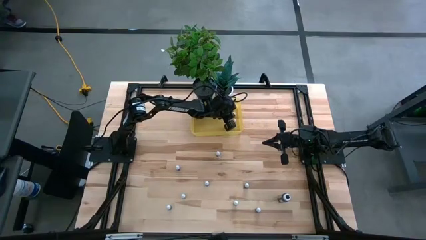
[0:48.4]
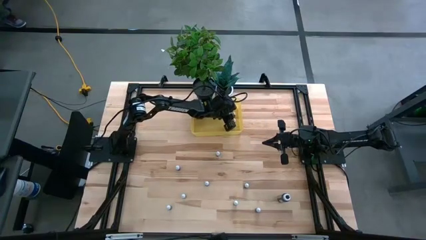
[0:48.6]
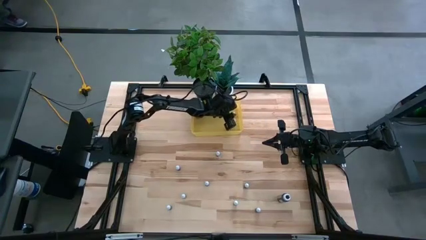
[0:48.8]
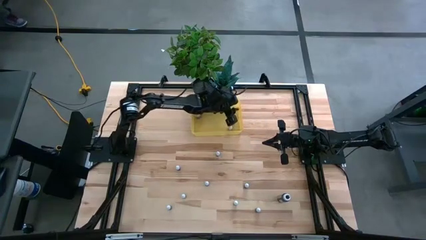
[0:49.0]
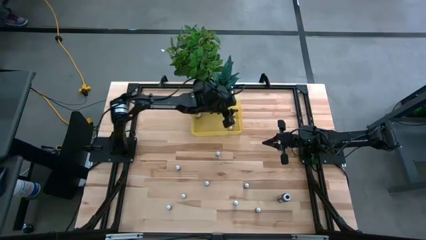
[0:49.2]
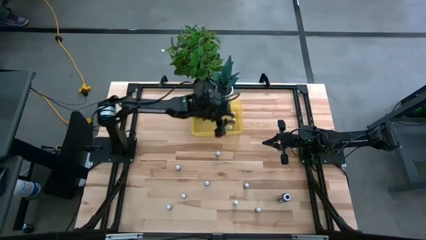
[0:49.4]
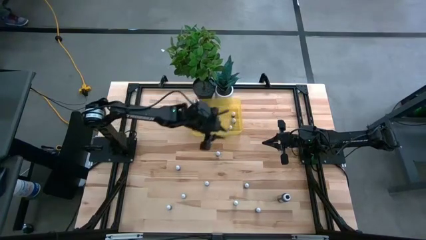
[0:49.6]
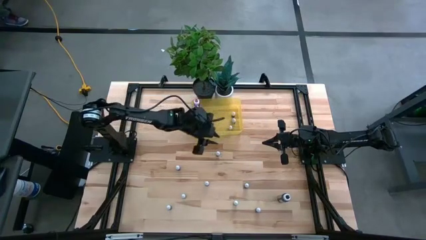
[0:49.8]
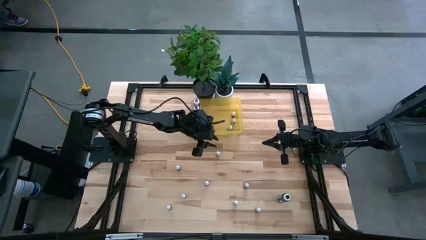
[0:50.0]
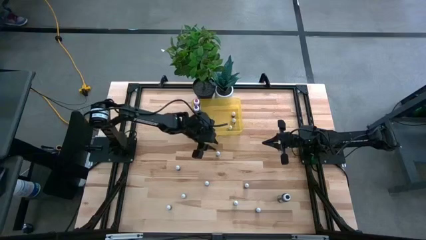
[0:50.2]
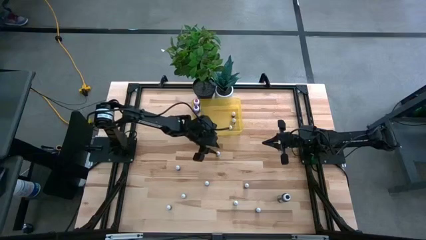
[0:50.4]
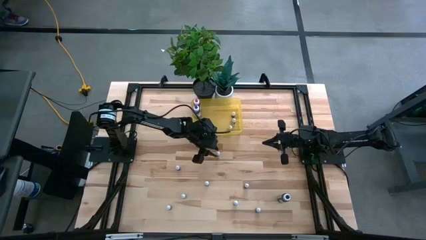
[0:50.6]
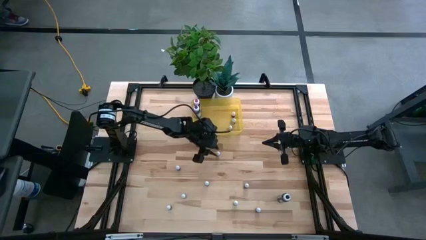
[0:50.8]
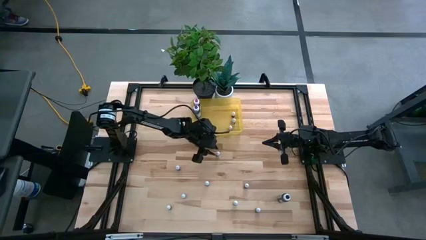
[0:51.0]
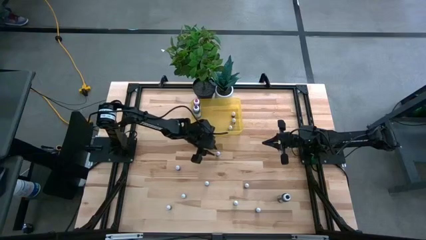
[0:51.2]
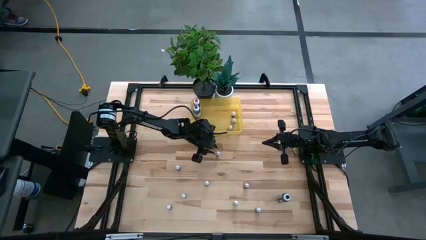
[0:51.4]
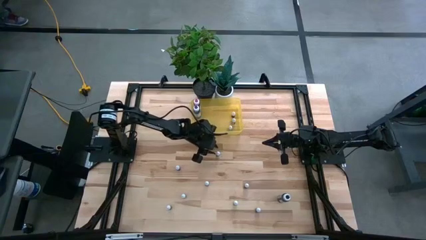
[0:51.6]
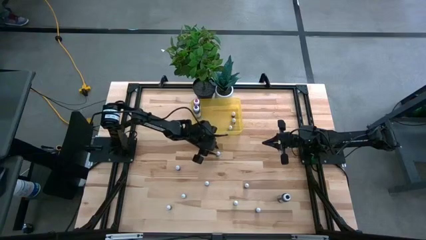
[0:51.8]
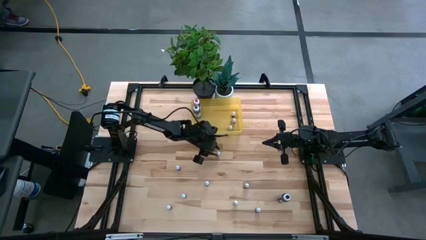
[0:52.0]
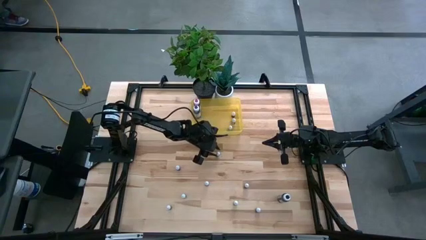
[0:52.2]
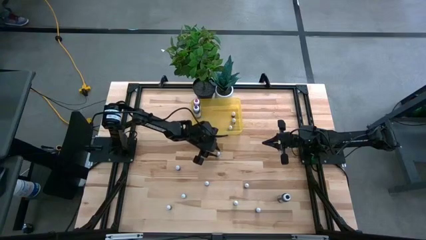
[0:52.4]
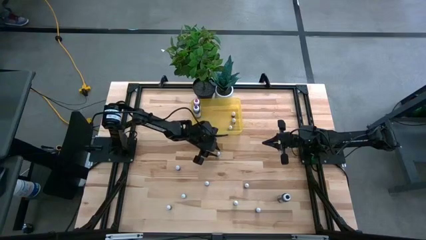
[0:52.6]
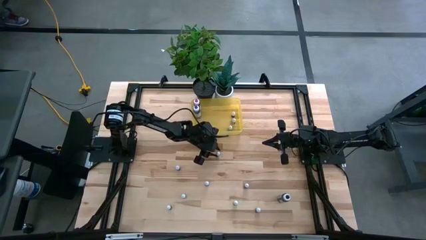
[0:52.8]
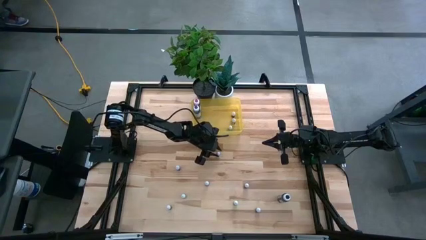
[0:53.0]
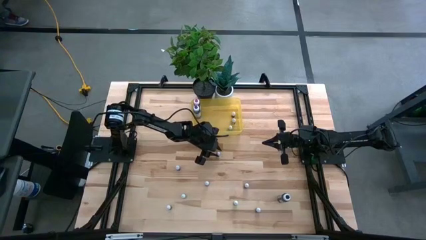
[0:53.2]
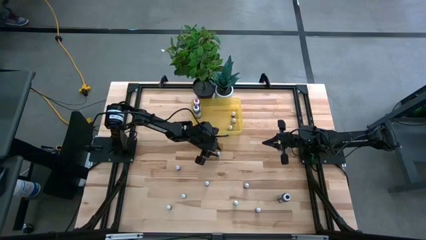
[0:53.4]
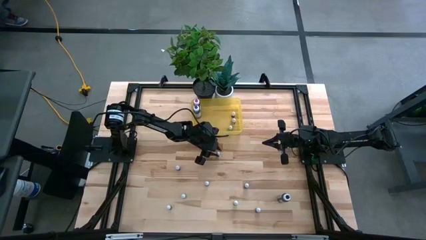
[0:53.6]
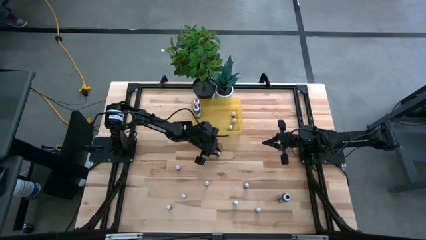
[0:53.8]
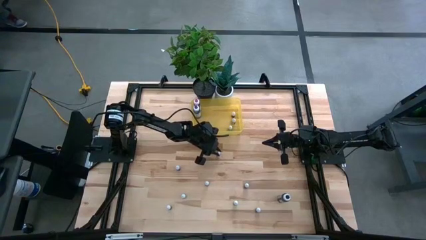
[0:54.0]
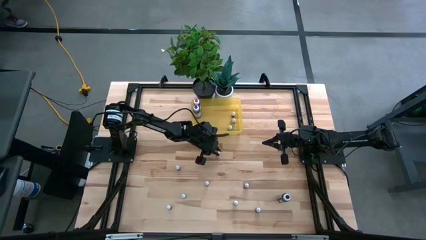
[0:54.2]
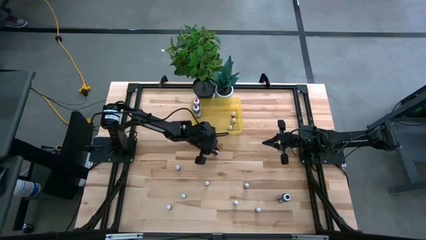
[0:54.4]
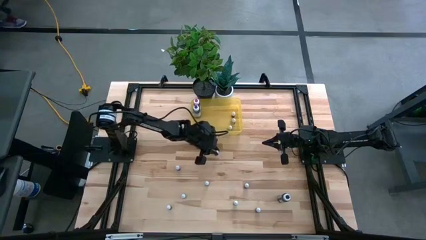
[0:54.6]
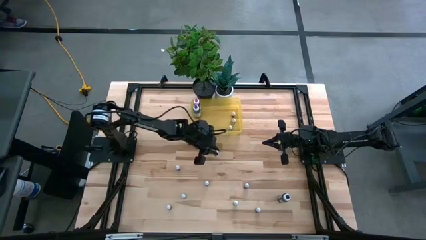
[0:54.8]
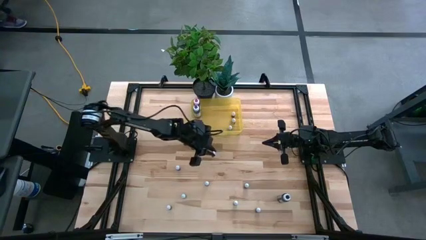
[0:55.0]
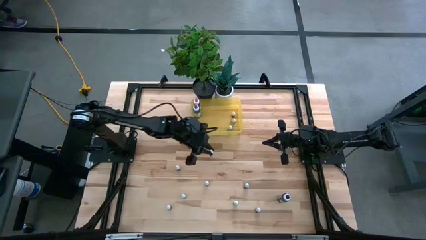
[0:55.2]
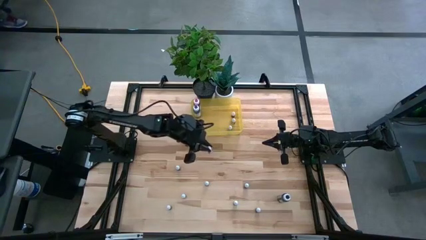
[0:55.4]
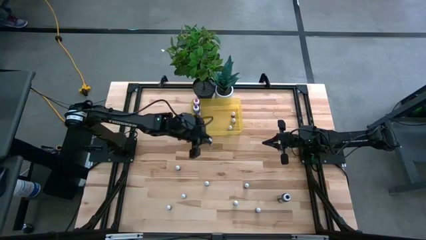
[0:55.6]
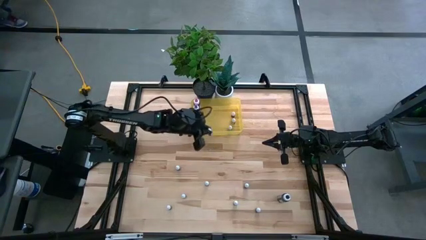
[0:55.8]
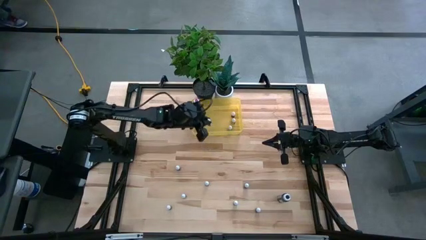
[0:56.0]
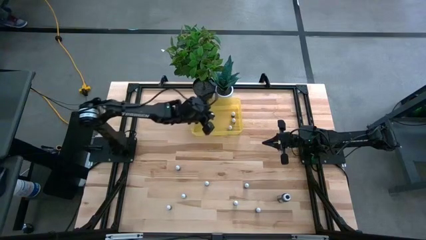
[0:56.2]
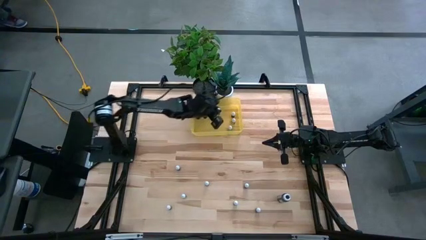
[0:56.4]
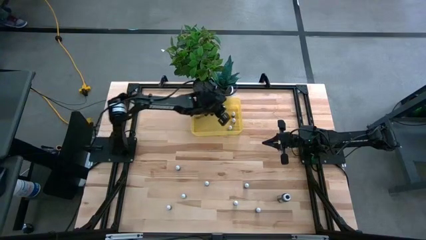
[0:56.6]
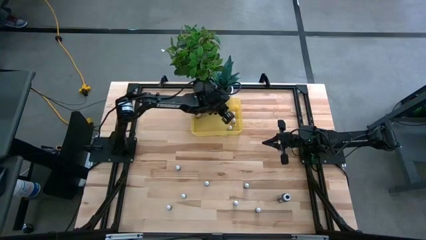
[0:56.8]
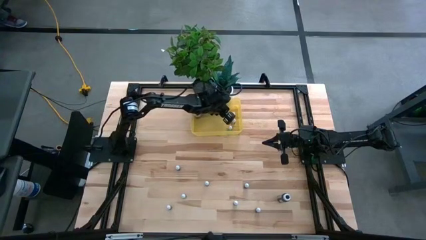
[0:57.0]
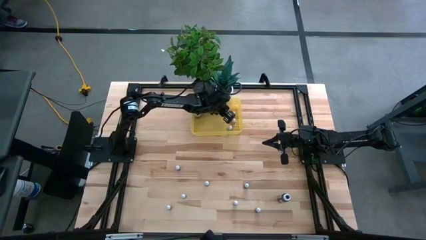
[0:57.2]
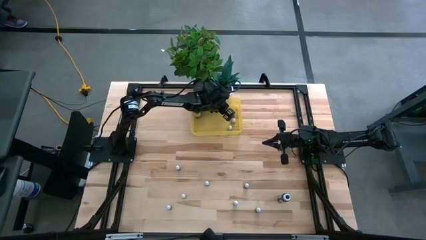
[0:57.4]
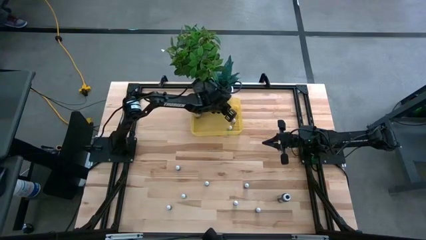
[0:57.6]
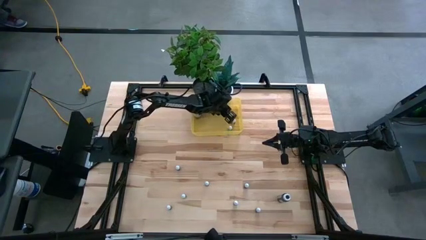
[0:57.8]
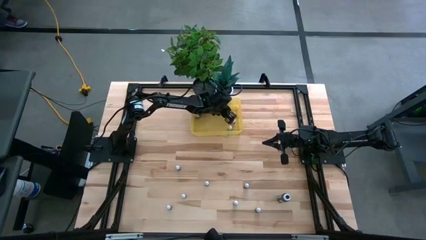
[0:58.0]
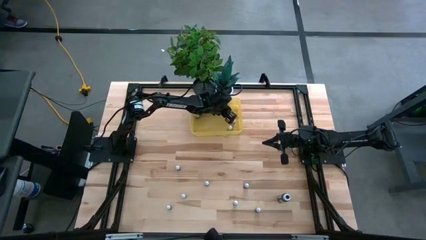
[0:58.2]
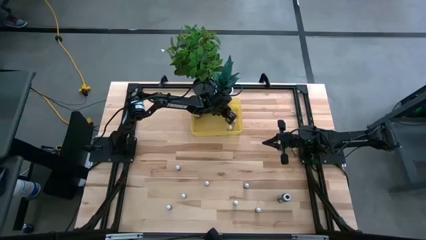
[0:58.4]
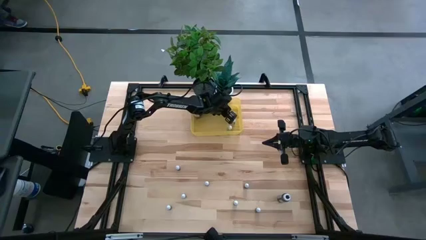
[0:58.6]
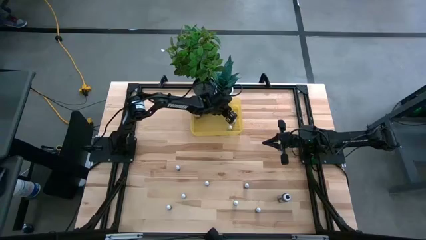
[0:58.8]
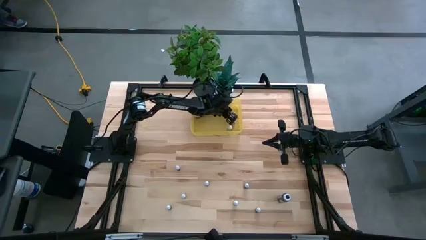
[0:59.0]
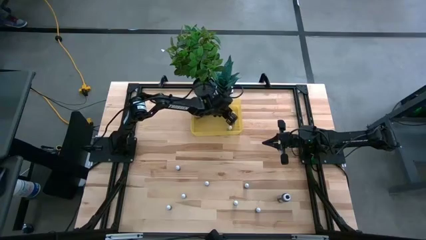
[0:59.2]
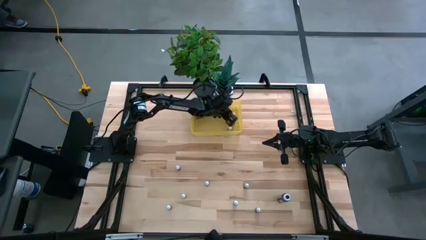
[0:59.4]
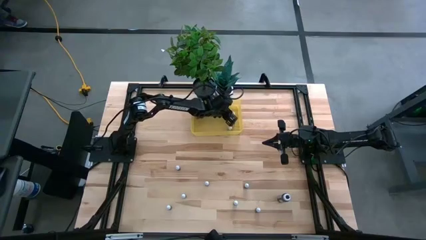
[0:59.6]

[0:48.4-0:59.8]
Task: Pick & Place food coloring
Put the small violet food coloring bottle into the yellow bin

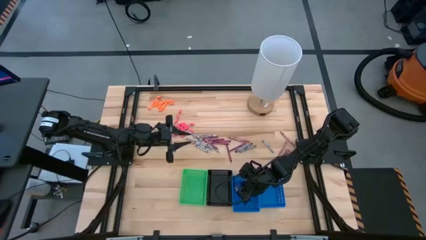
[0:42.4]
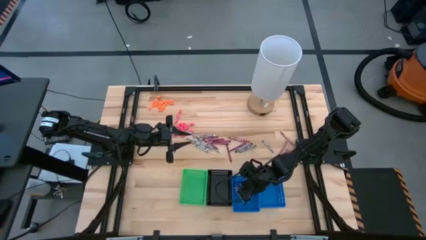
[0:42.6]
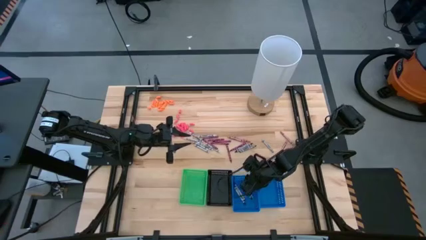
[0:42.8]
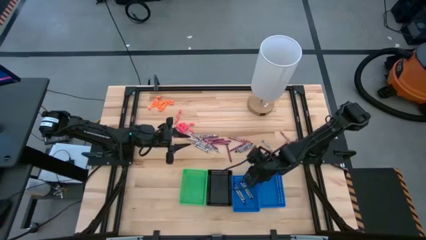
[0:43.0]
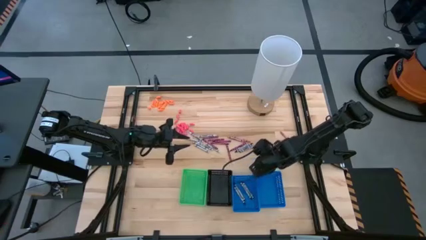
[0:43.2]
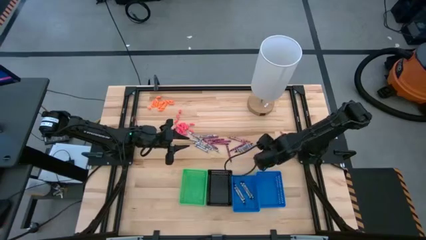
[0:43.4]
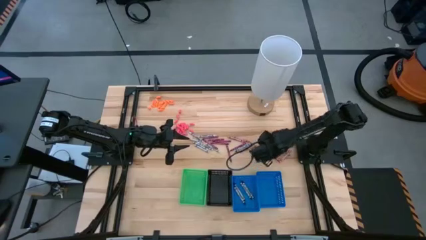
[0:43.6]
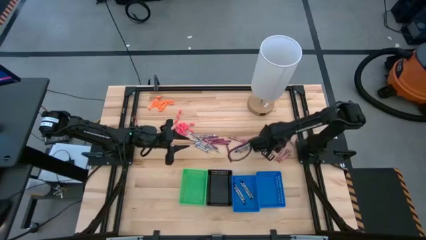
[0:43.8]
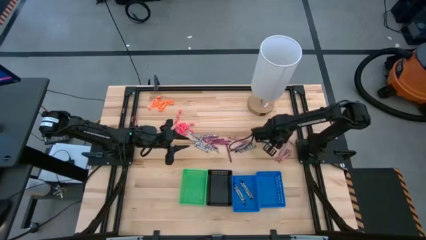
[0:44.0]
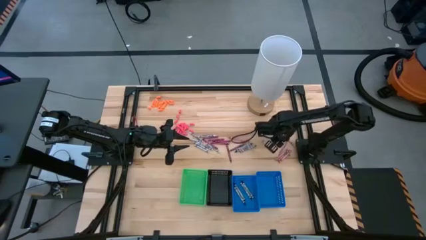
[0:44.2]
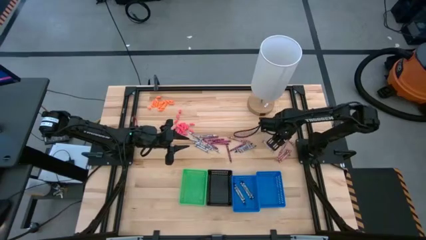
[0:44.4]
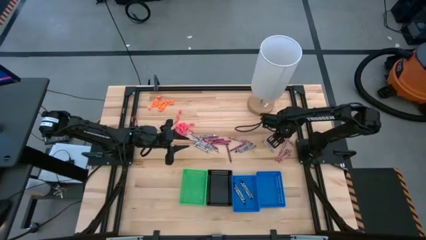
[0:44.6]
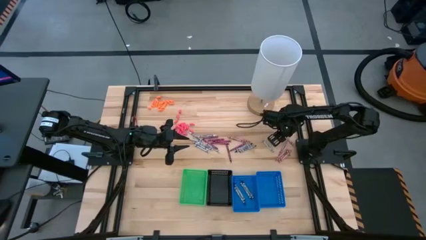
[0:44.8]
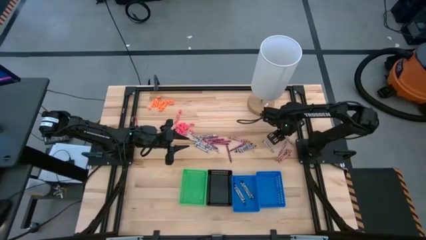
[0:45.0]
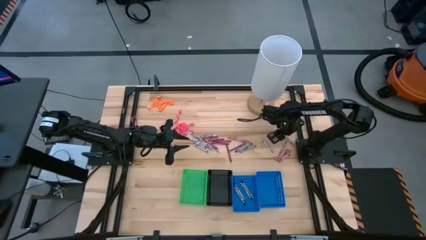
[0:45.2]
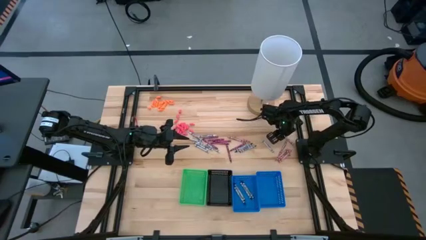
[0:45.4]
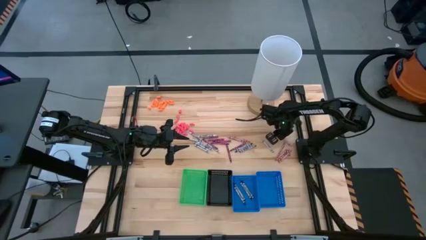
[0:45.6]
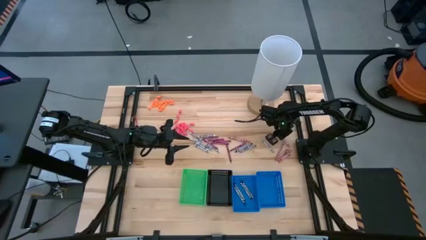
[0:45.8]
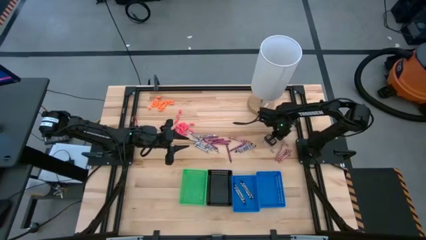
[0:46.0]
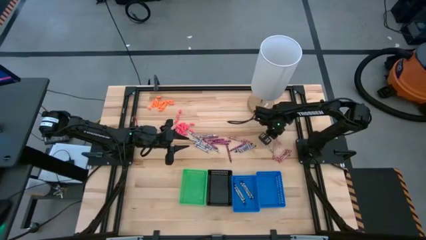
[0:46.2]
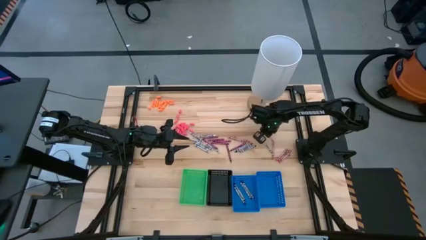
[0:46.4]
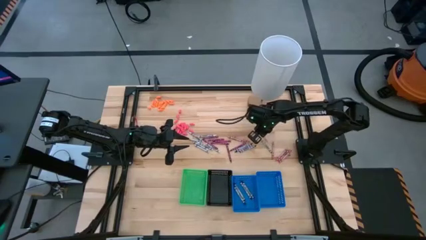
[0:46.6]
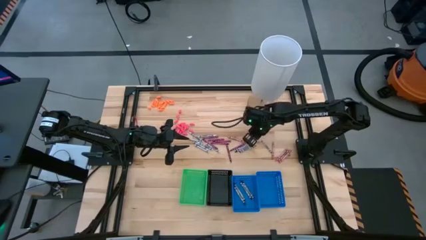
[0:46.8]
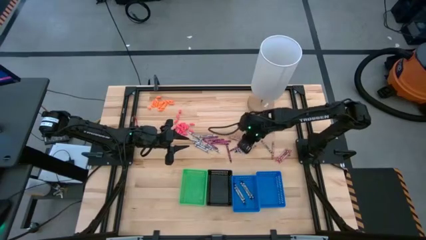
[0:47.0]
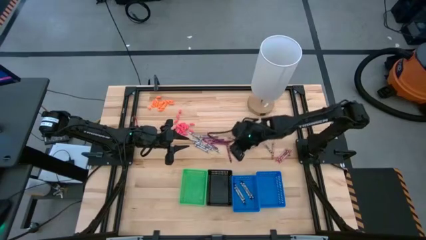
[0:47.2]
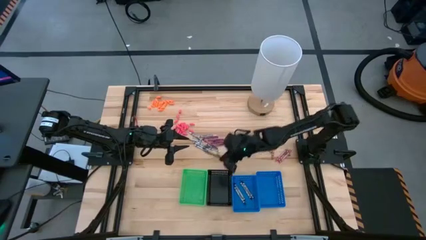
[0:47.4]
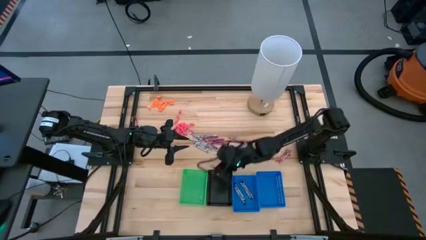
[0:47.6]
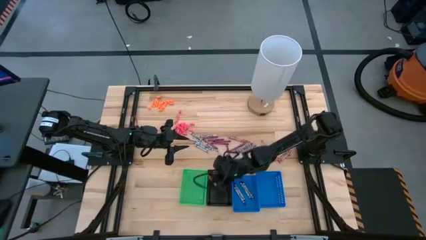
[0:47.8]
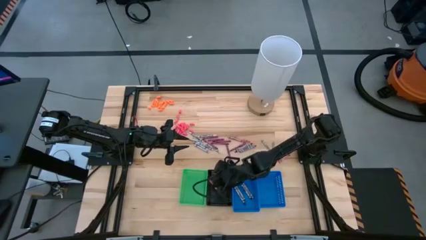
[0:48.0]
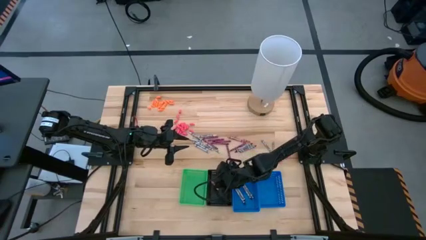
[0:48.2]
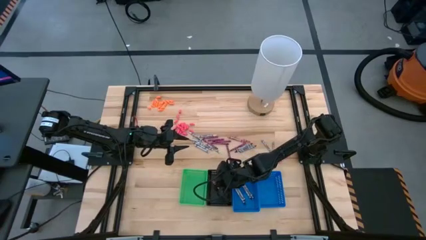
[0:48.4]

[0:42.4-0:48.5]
Task: Sort crayons
Put the pink crayon into the black bin
